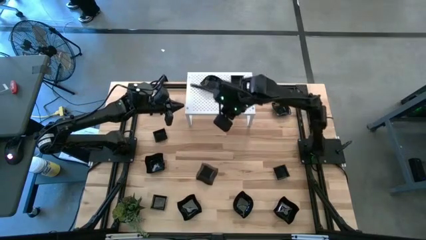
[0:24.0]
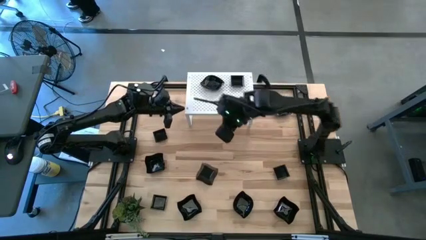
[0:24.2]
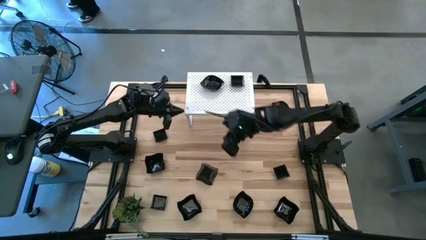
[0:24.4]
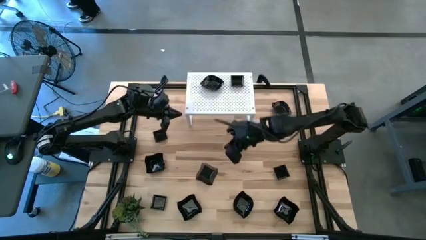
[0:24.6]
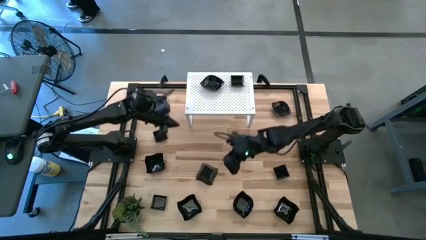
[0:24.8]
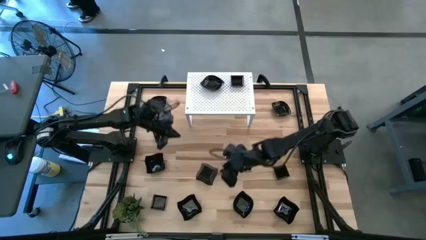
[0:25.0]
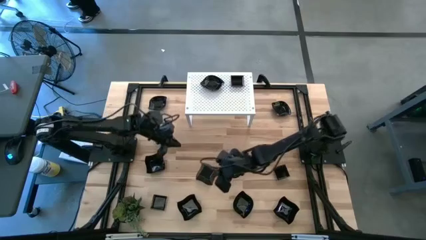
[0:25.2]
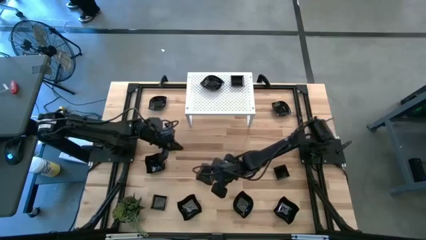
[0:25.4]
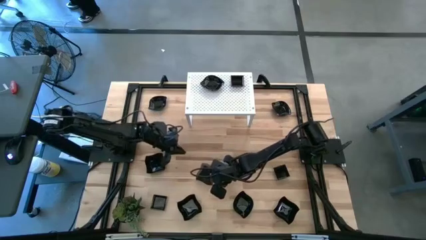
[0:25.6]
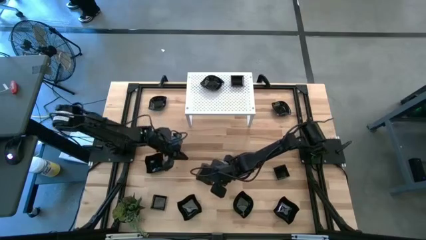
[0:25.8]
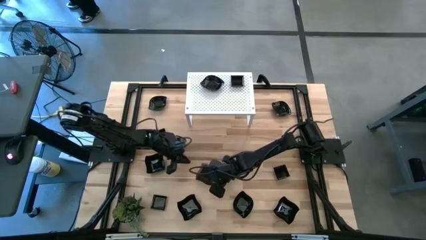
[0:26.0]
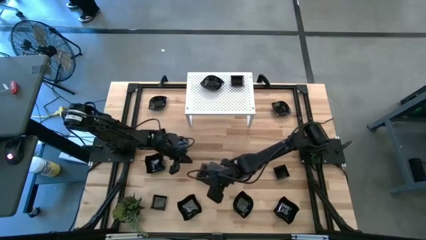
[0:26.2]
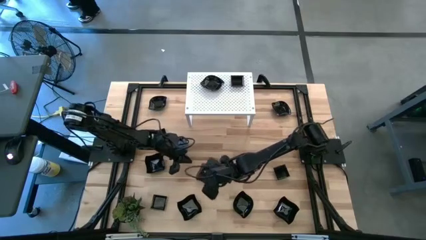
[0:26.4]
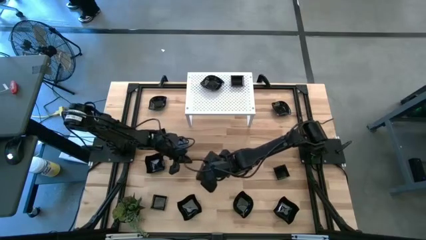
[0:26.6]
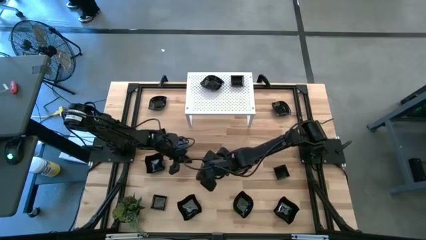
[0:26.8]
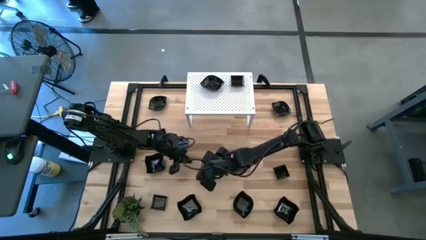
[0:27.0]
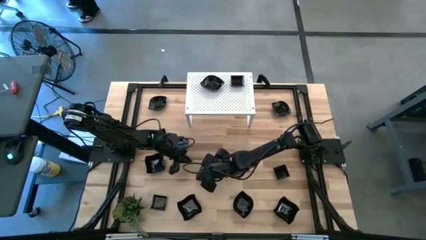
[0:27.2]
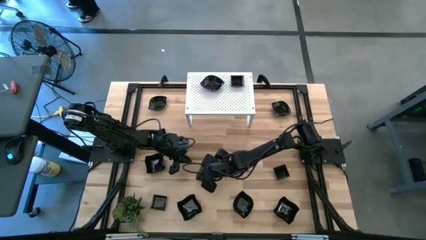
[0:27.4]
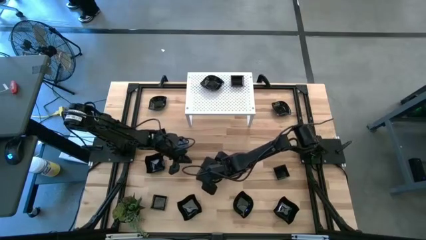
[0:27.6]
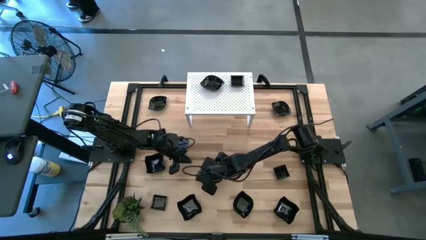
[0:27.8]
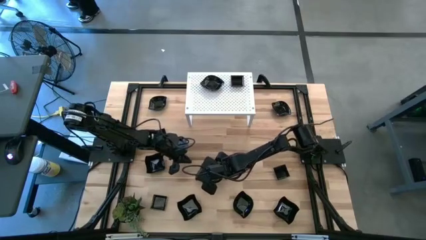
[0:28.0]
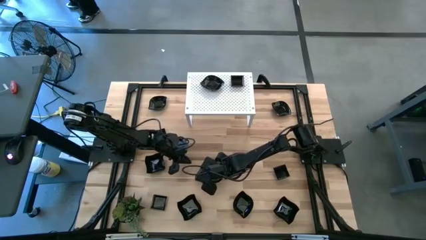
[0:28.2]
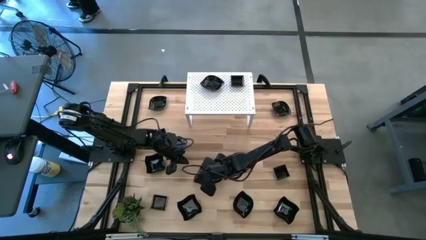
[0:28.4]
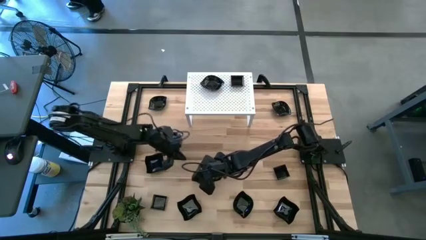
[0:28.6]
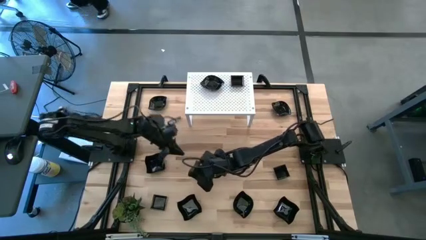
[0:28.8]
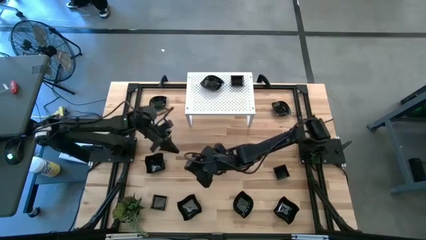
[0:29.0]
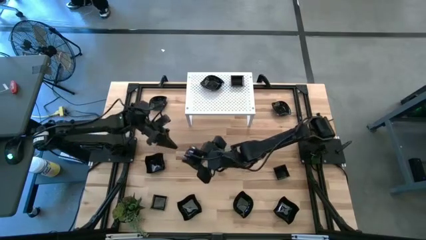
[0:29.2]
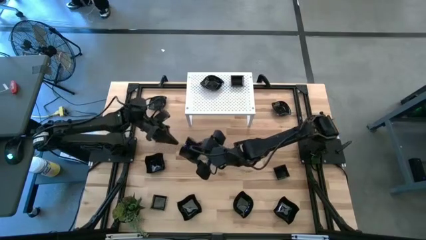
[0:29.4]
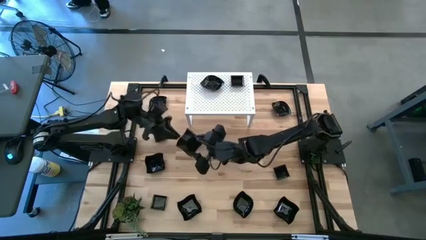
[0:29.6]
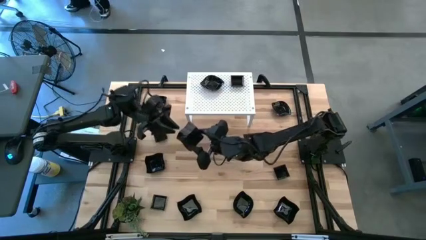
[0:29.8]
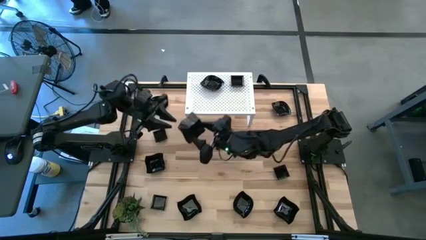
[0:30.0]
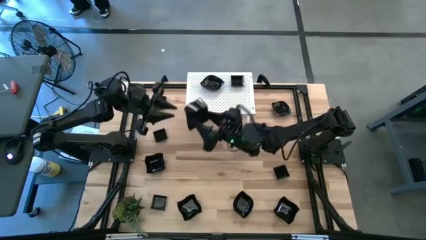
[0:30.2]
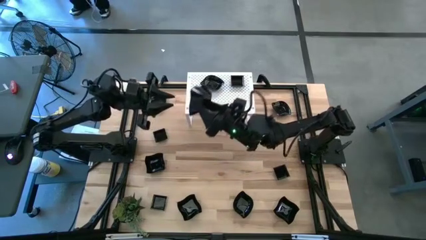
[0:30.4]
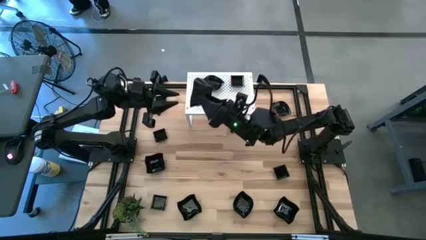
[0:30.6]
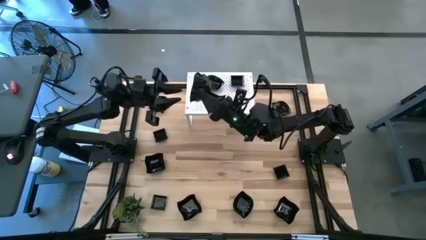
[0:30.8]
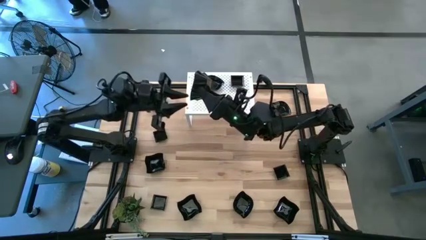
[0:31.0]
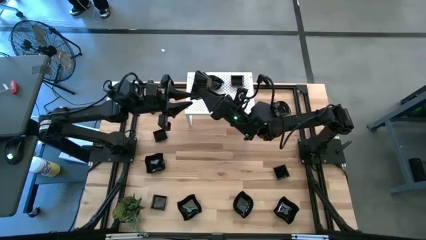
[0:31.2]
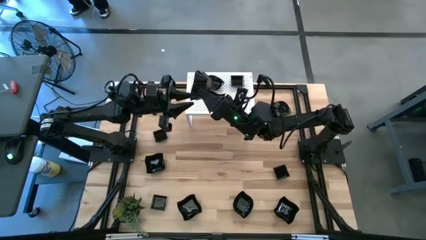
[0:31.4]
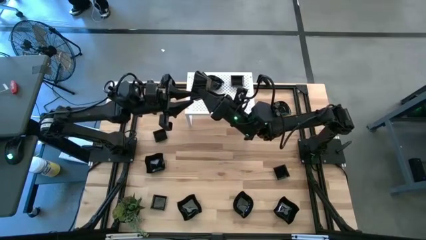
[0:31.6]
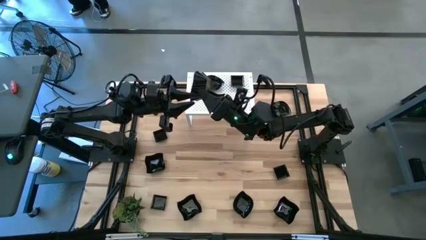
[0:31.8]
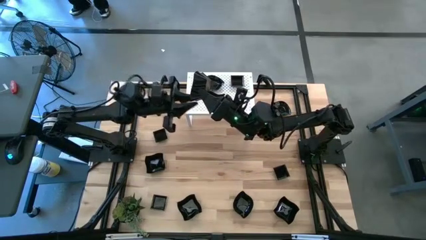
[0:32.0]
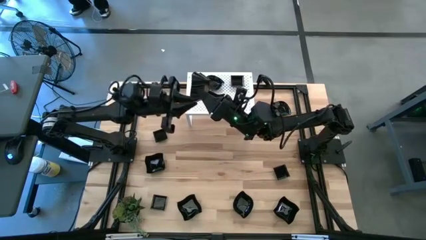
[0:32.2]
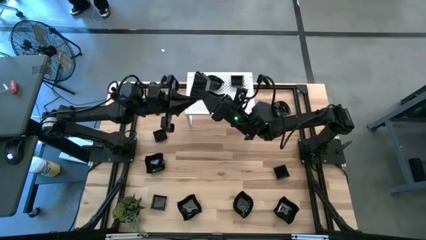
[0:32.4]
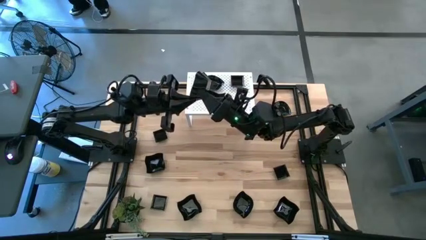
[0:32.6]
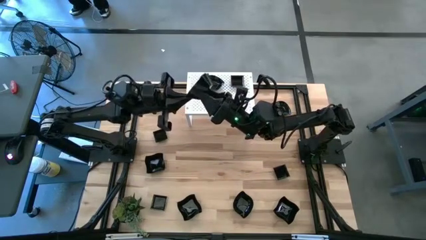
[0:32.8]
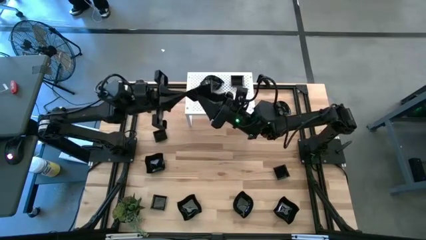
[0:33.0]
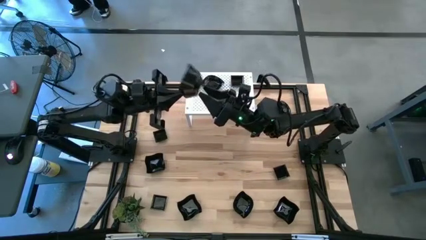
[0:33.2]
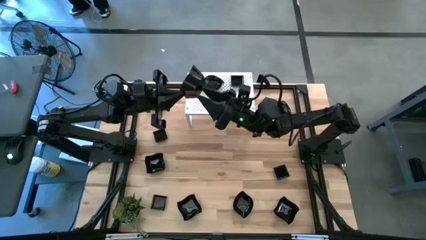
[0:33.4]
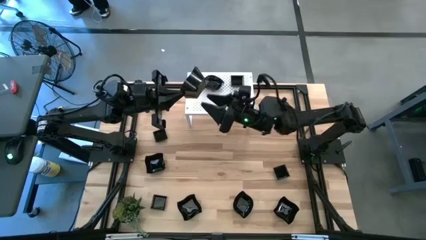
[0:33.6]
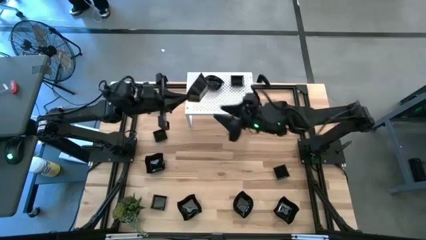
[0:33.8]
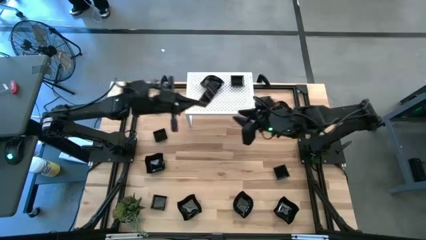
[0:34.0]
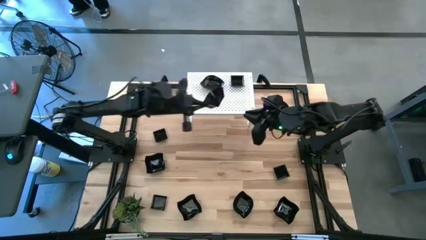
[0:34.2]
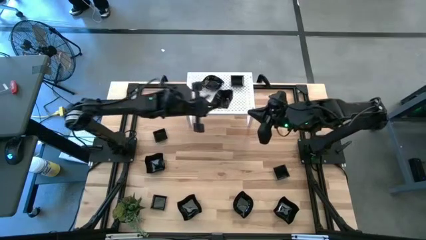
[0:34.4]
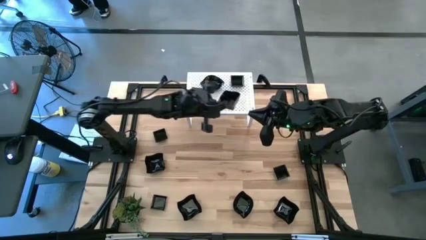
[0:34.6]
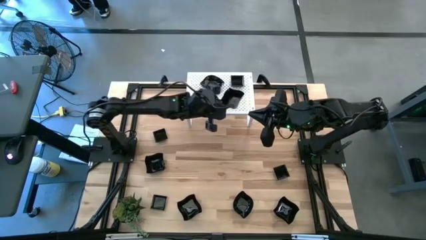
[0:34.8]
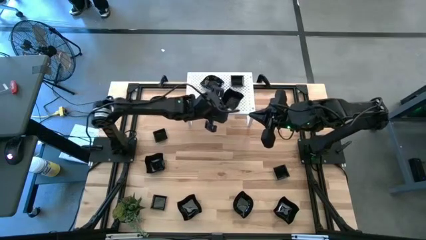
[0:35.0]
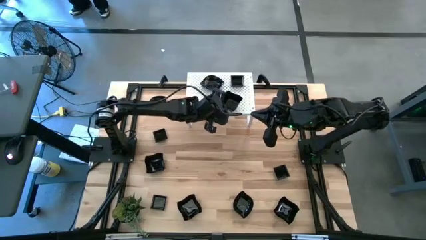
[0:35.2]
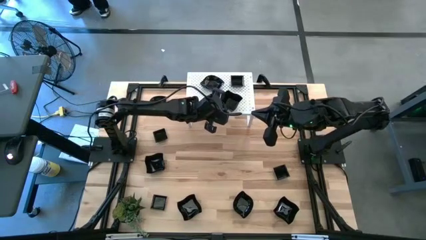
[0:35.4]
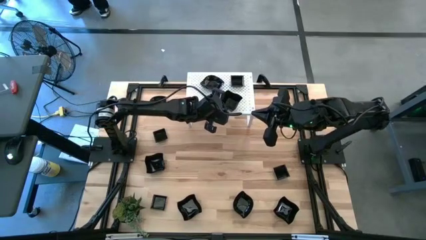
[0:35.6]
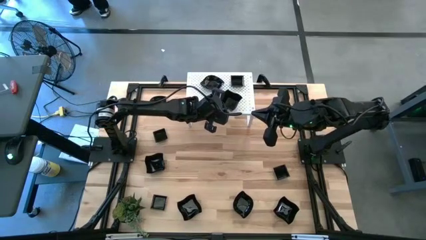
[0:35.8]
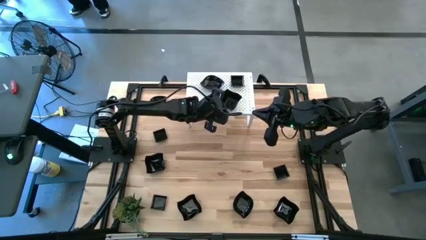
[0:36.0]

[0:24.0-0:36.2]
Task: Pick & Place Mini shaped plates
Put the distorted square plate on the shelf

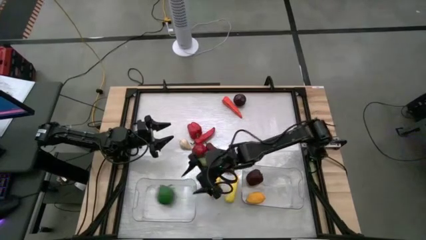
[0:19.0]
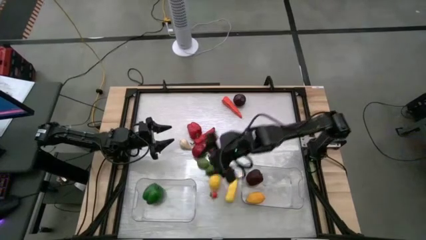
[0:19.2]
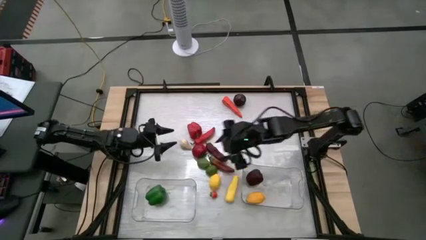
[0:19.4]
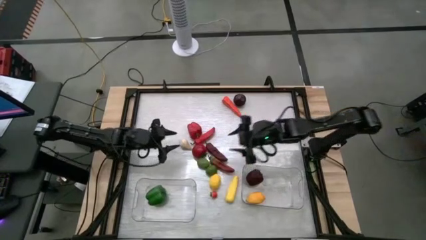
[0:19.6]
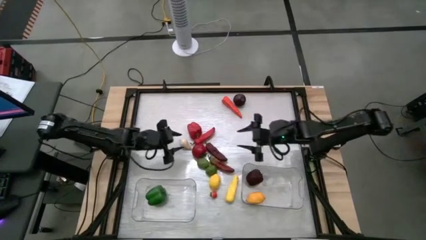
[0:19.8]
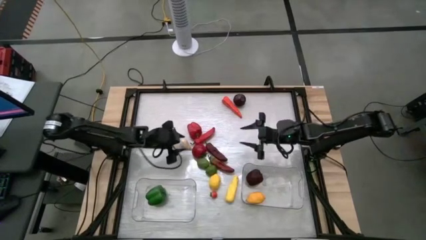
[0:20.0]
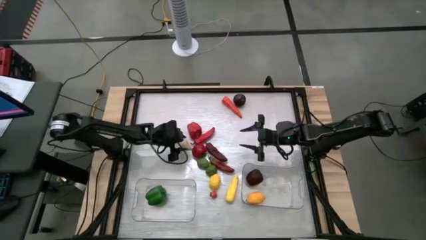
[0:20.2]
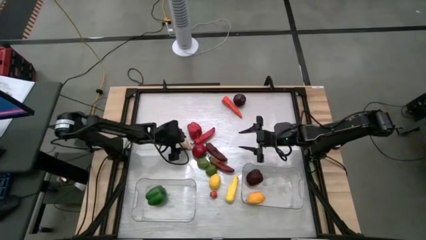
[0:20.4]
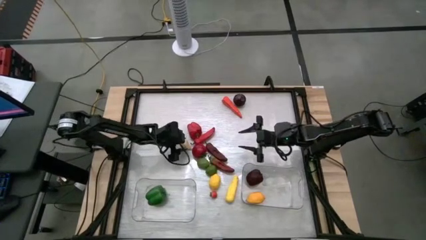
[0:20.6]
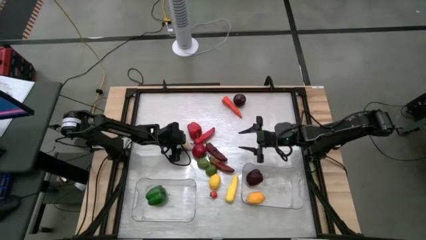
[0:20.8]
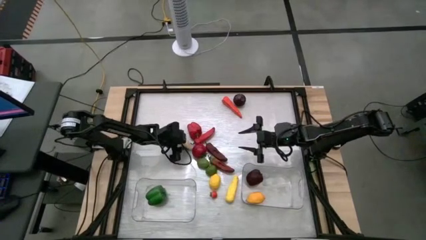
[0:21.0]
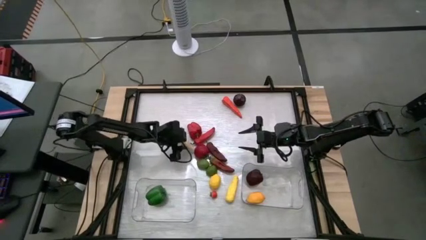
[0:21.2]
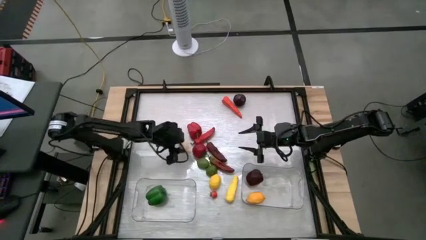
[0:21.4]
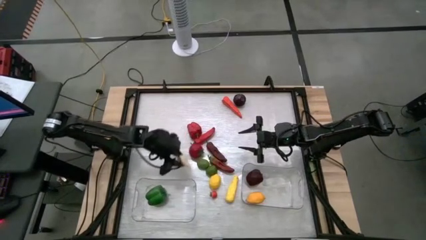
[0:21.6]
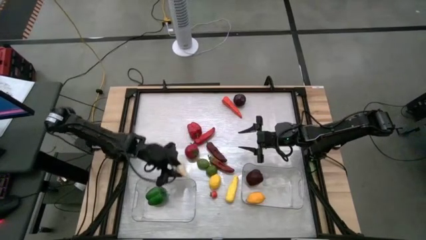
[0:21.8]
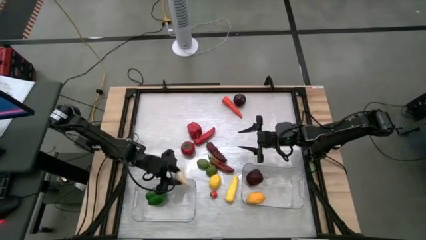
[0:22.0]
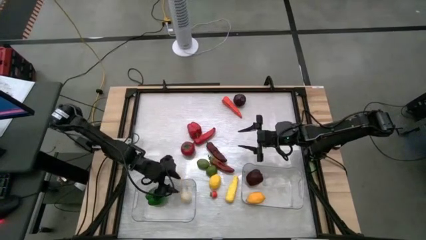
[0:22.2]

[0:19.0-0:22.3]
Task: Sort produce into baskets
Put the white garlic into the left transparent bin

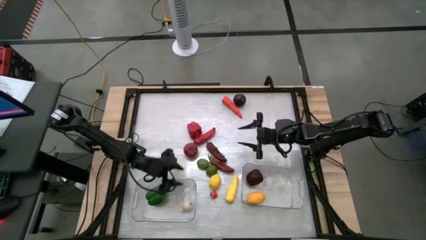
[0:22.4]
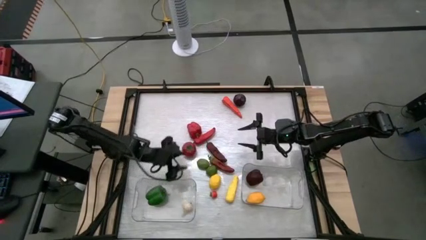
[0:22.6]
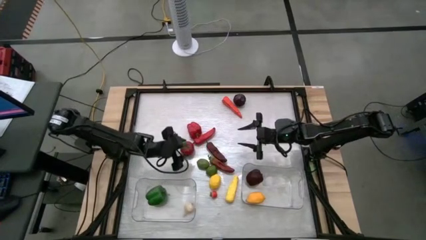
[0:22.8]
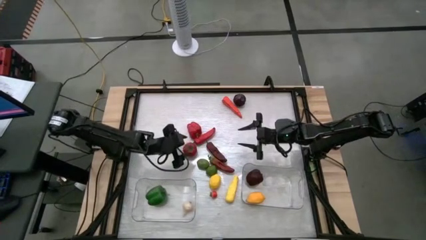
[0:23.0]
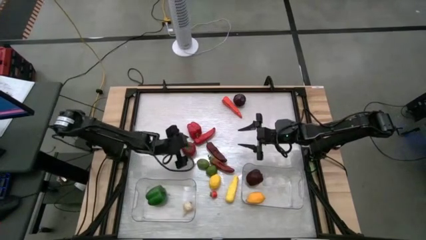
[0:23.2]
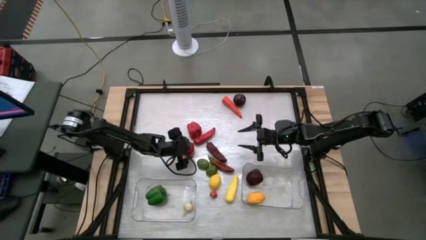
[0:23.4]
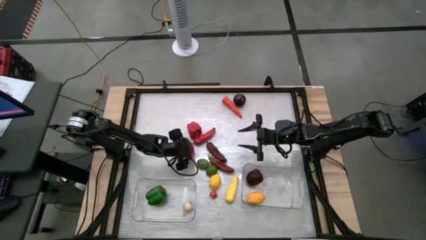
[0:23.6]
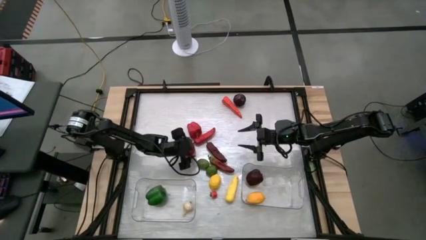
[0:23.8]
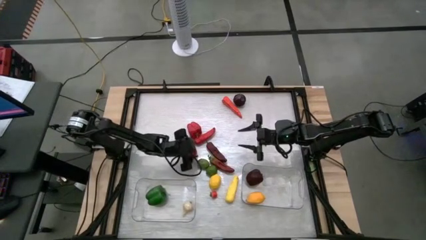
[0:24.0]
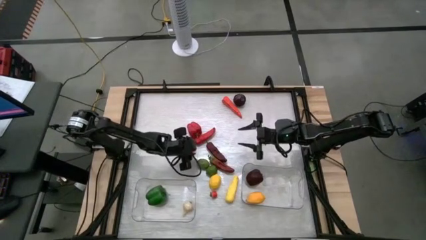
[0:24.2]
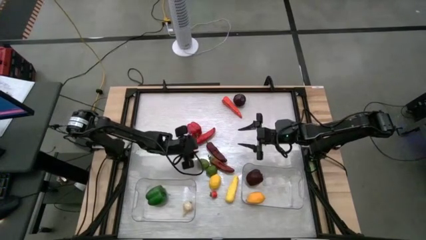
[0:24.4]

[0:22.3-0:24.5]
Put the red tomato into the right transparent bin
